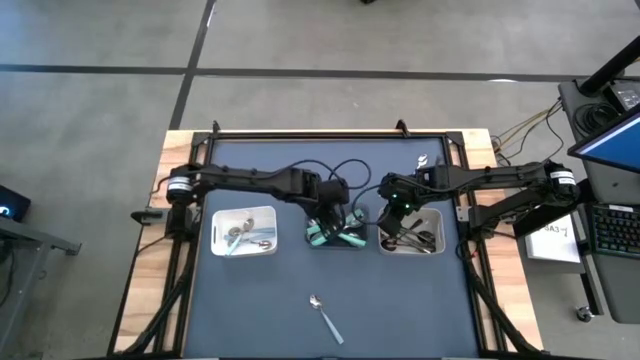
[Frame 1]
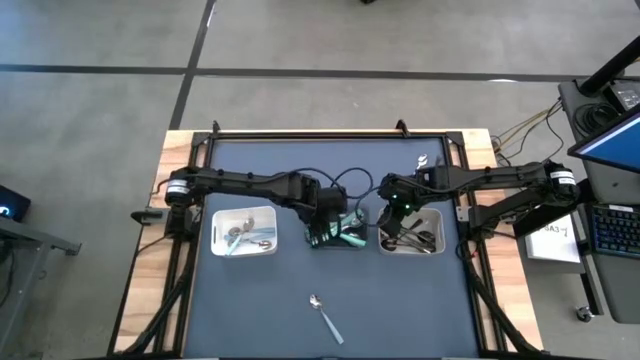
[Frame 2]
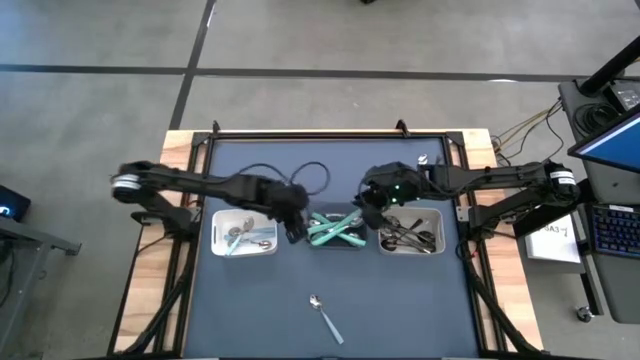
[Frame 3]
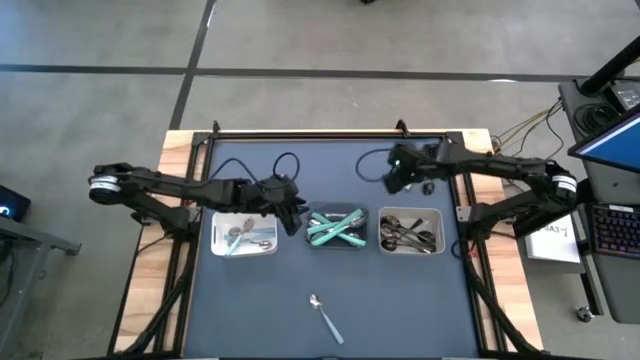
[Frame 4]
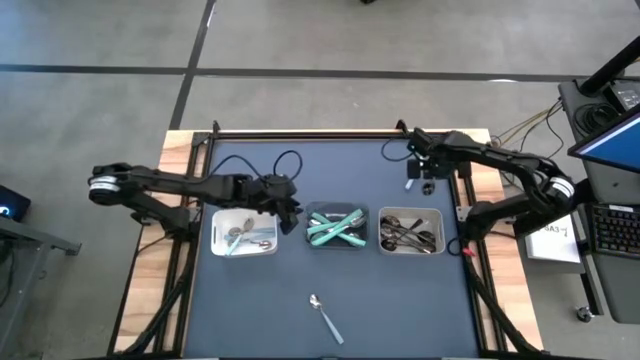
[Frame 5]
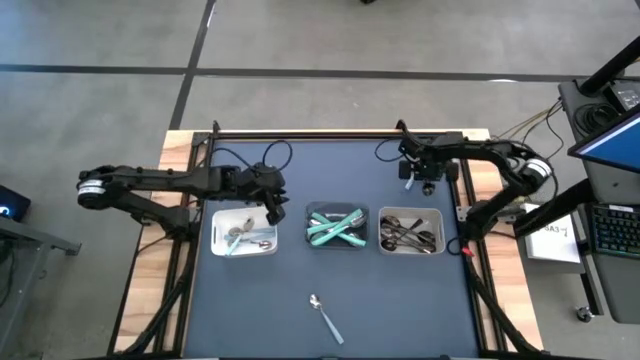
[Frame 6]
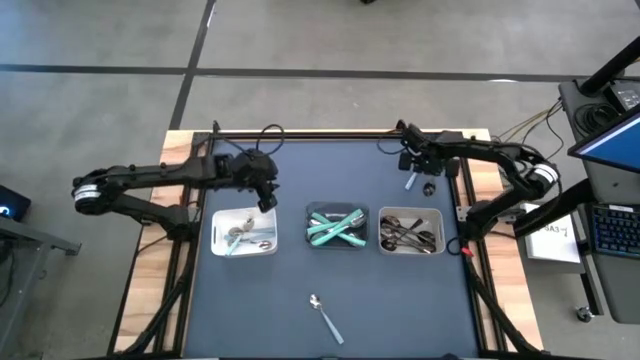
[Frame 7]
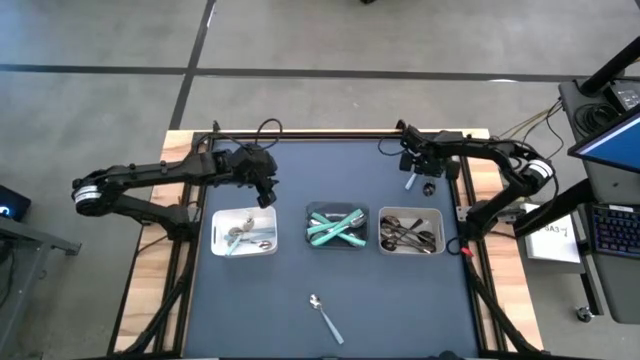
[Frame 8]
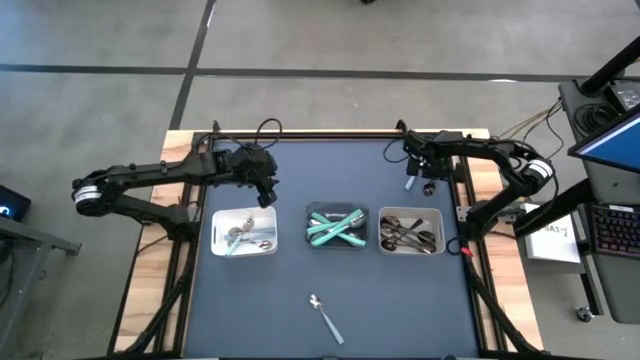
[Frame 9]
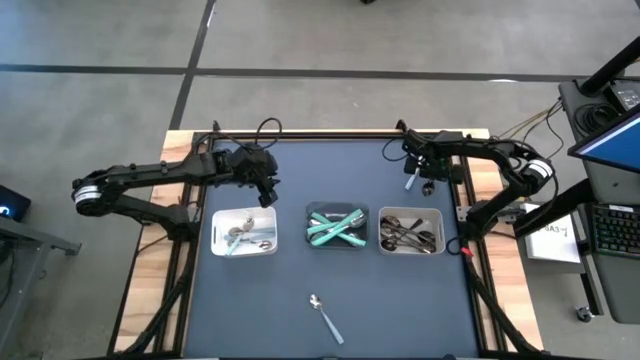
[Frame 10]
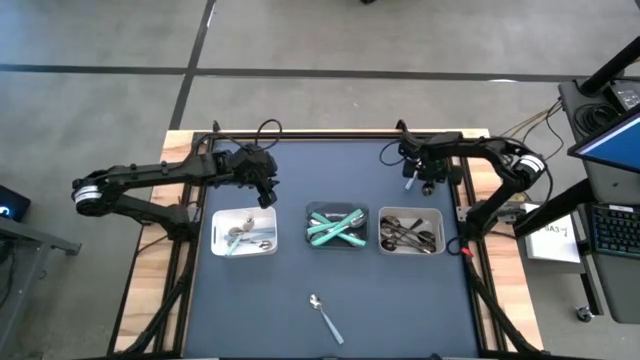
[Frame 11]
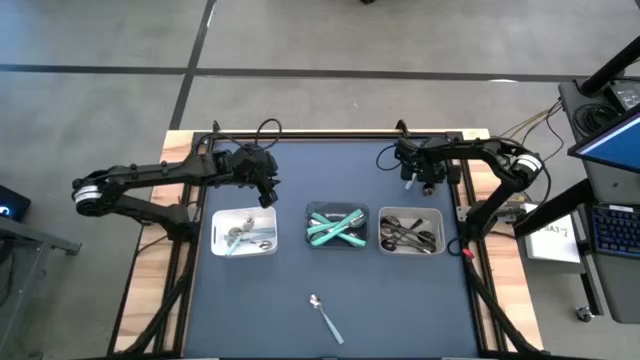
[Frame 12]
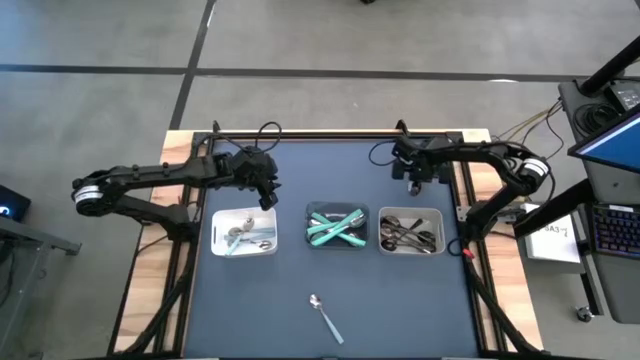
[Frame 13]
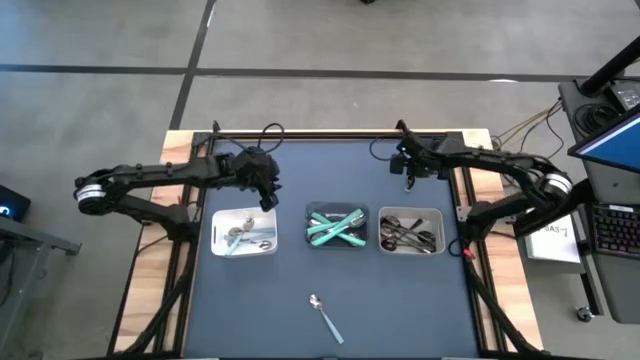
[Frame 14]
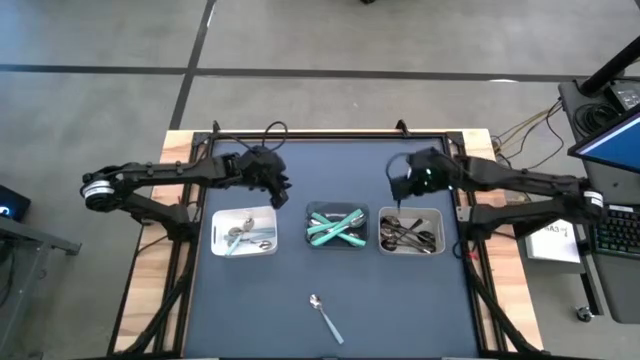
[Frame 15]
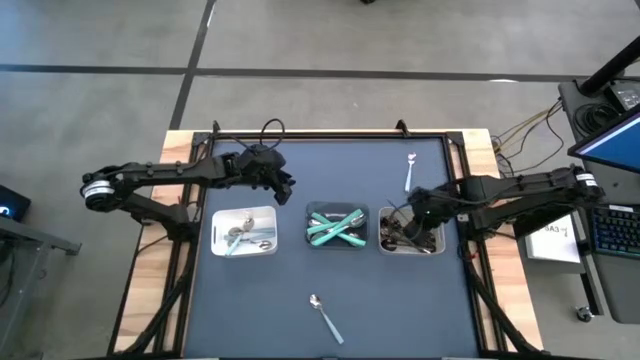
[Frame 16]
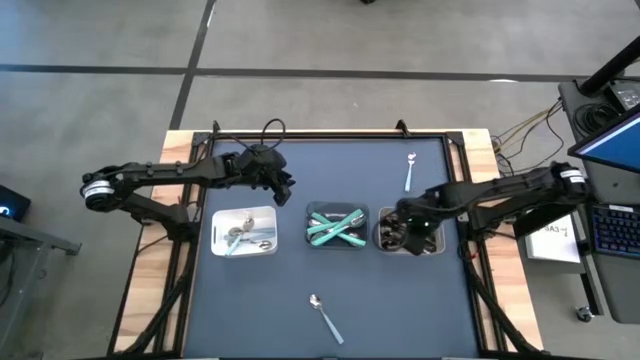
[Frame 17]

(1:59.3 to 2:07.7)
Task: Sort silverware by color (type)
Put the black spoon into the gray bin

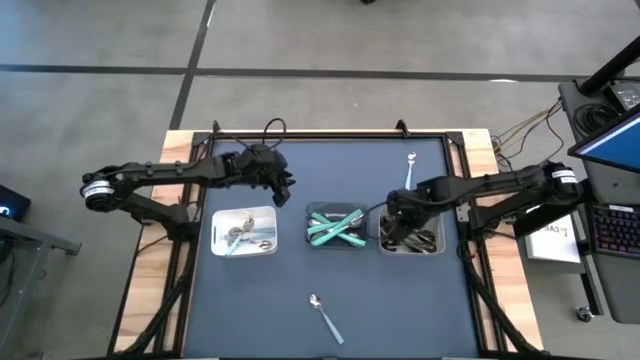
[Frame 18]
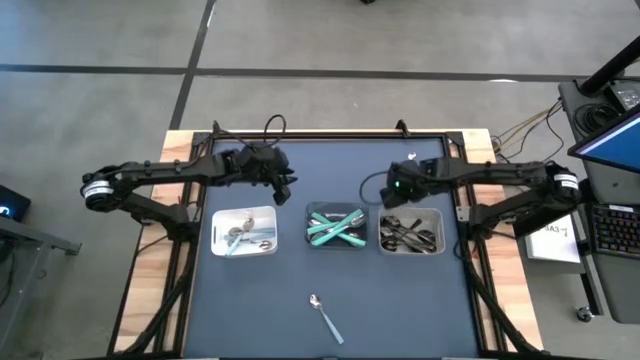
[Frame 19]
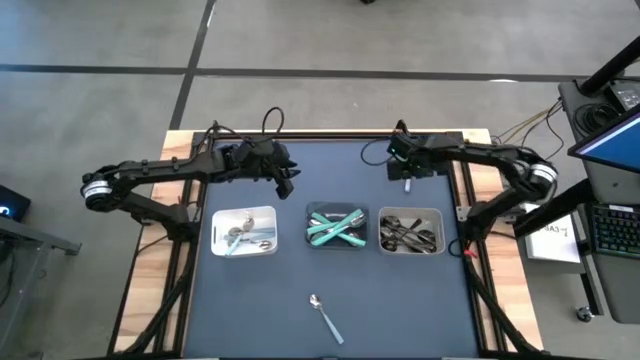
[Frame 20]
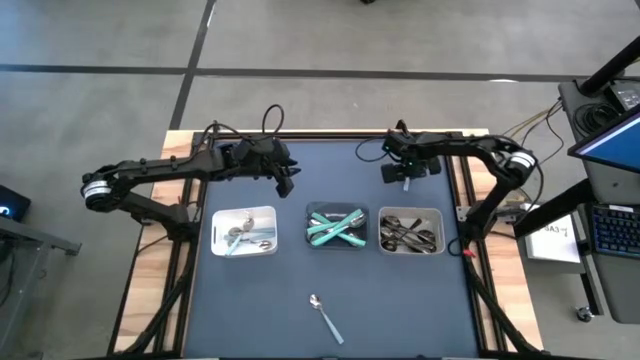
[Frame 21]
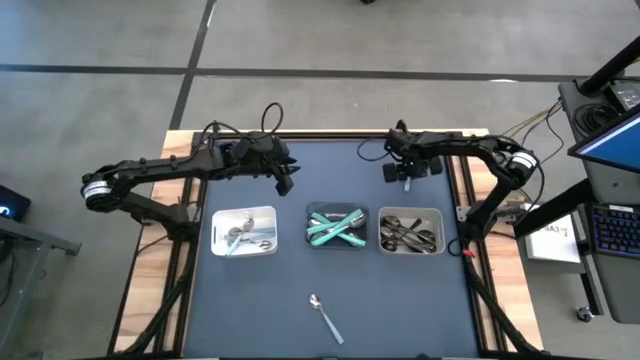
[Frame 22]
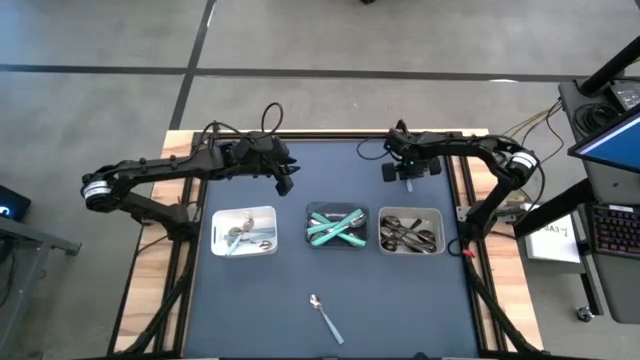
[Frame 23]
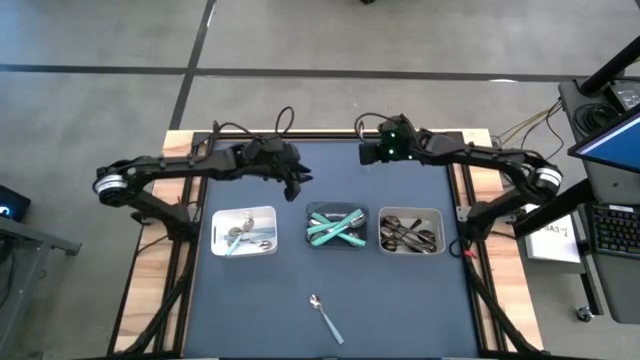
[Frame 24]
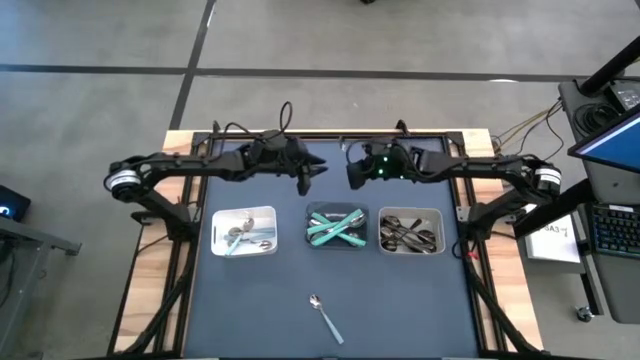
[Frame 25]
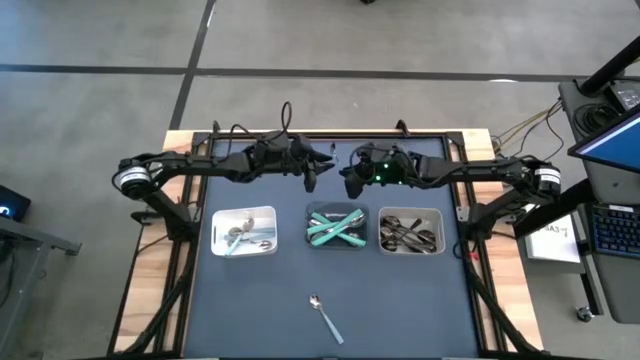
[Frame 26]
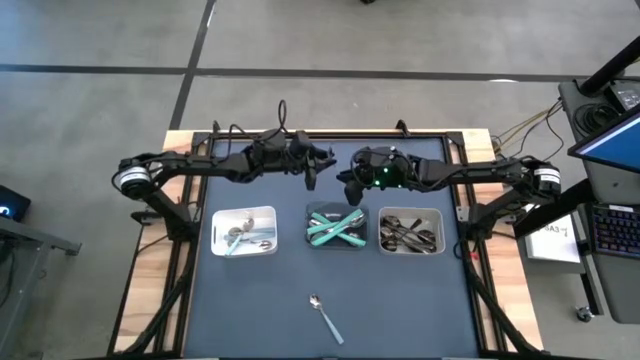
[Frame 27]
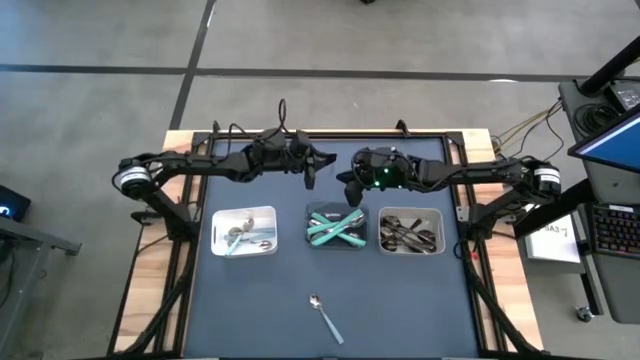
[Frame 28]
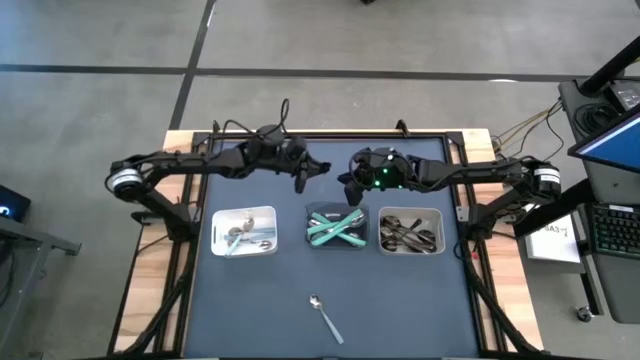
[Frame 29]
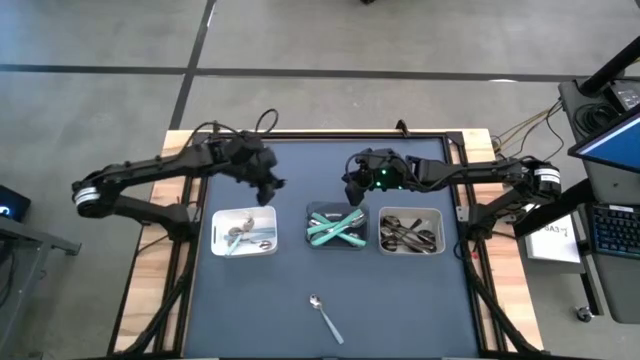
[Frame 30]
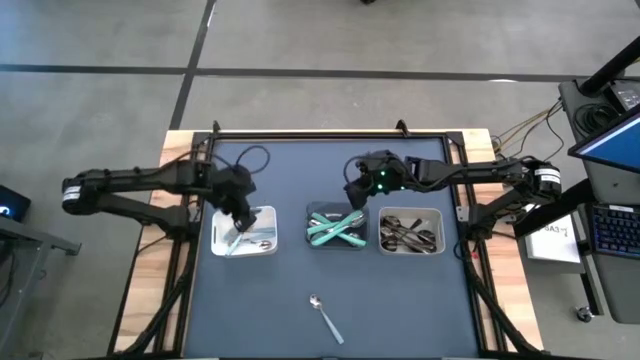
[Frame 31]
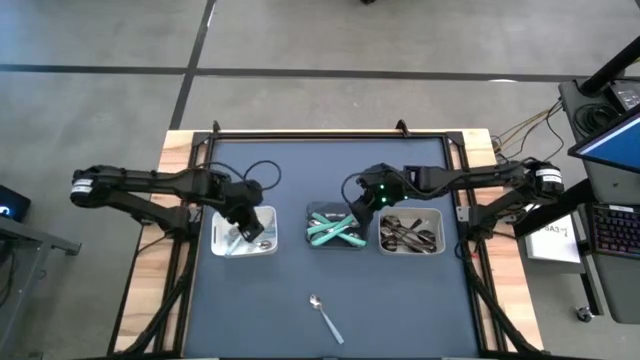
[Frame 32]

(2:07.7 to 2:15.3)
Put the light blue spoon into the white bin

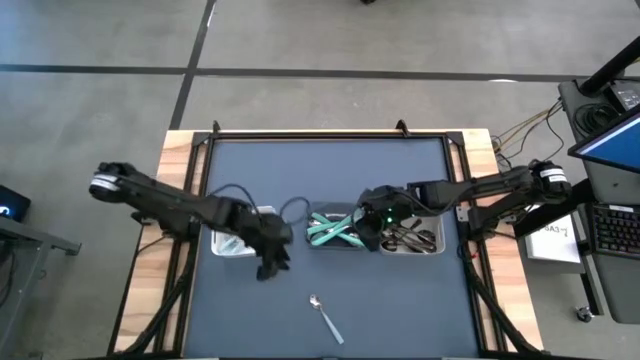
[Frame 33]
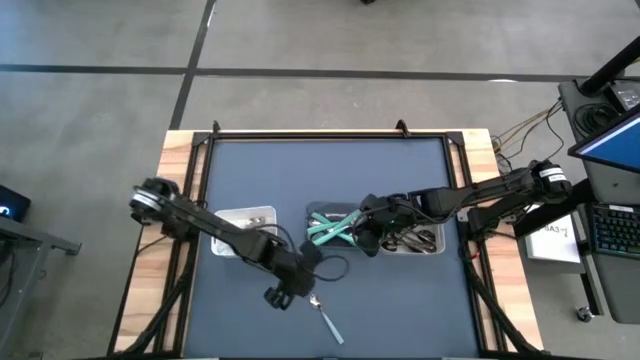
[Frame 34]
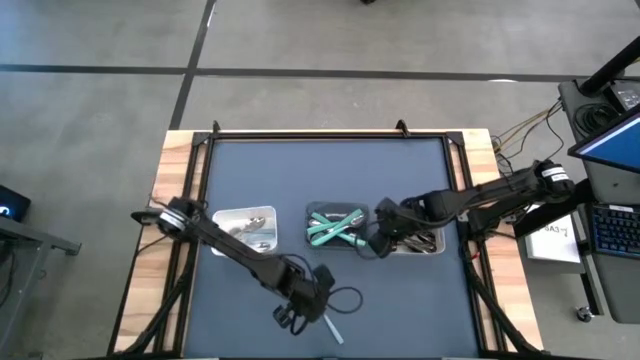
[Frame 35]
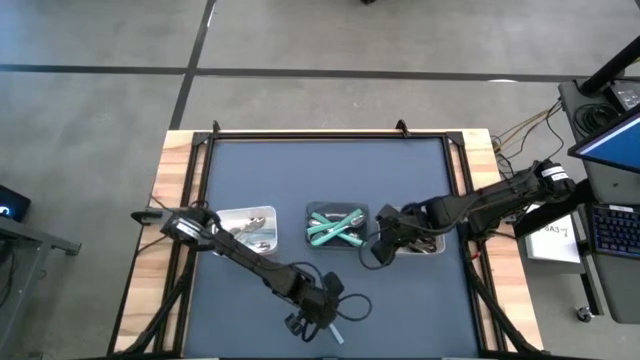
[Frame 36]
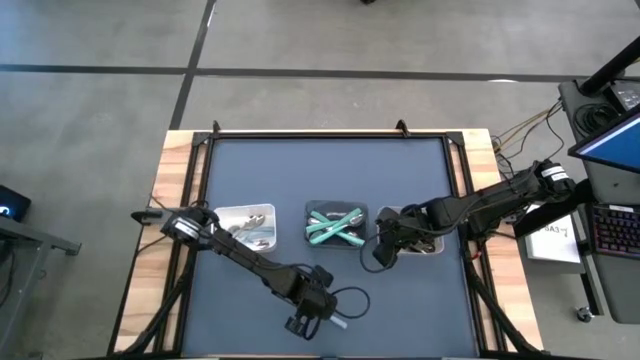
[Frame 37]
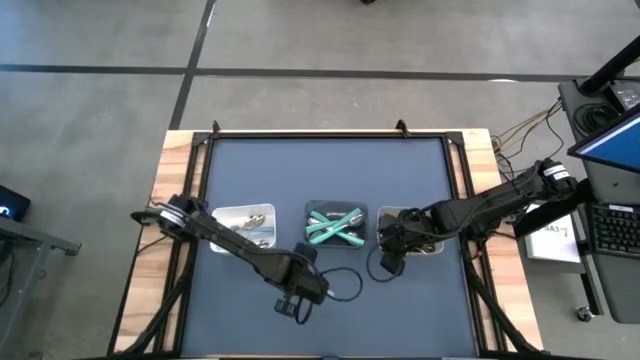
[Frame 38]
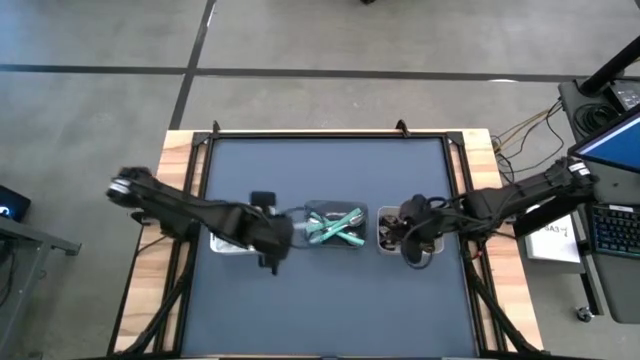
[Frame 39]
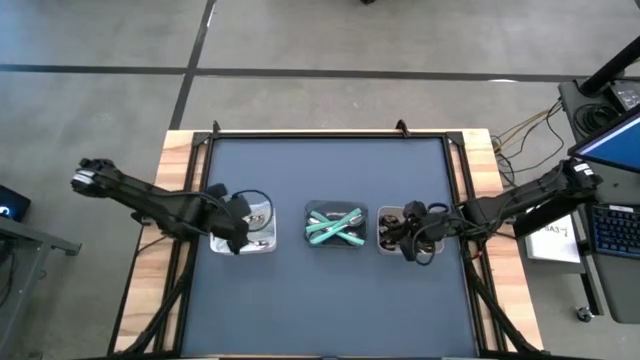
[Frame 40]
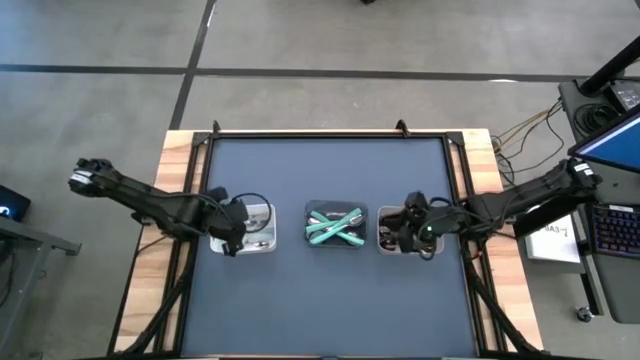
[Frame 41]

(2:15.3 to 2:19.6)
Put the light blue spoon into the white bin

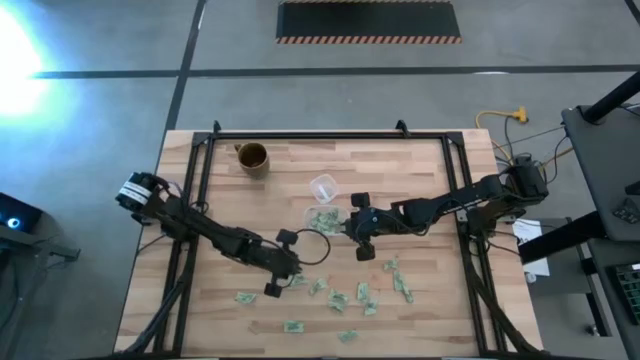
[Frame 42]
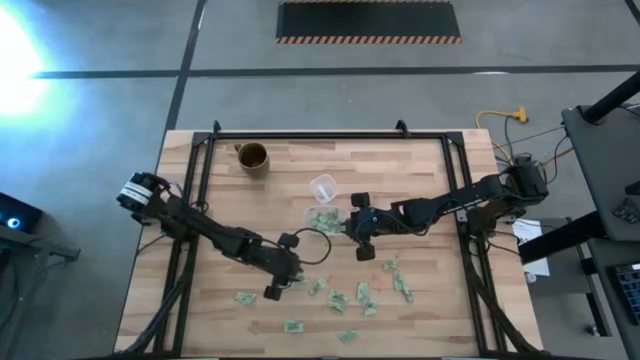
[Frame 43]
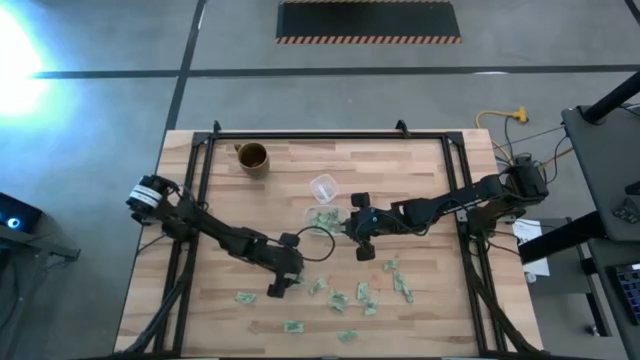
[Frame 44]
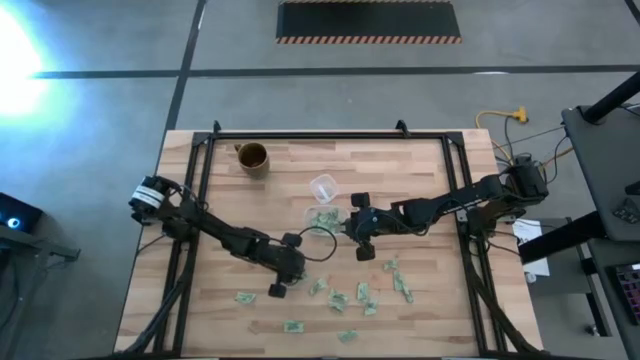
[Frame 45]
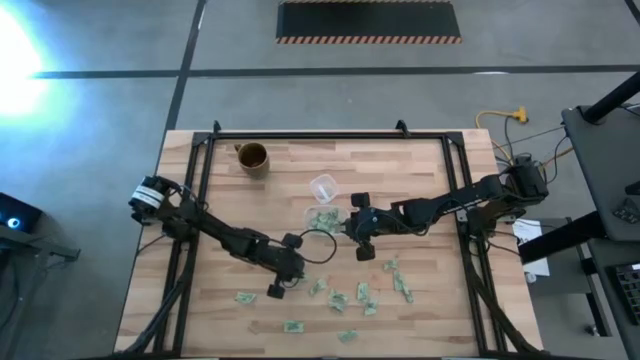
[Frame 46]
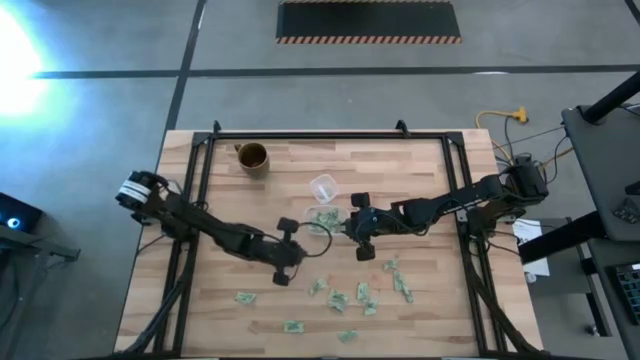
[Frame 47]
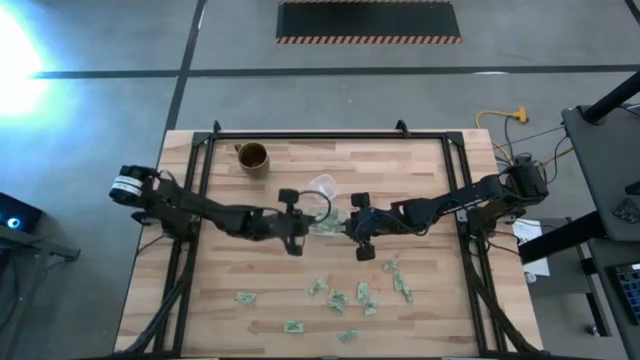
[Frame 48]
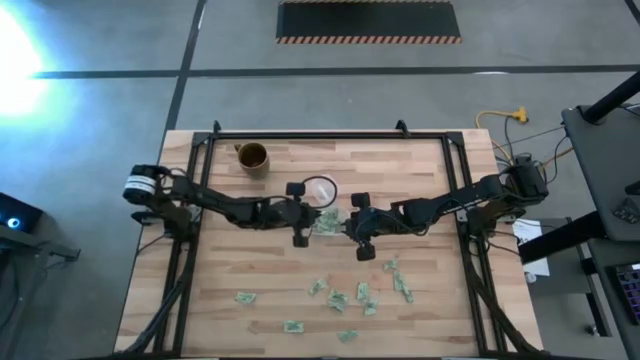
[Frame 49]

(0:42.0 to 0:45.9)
Task: Pick and place Stevia / Truvia into bins
Put the stevia packet into the bottom transparent container
